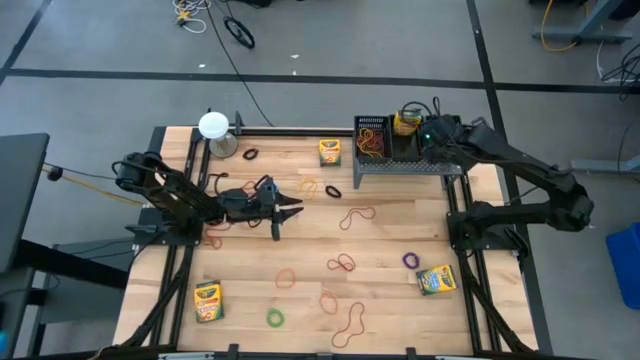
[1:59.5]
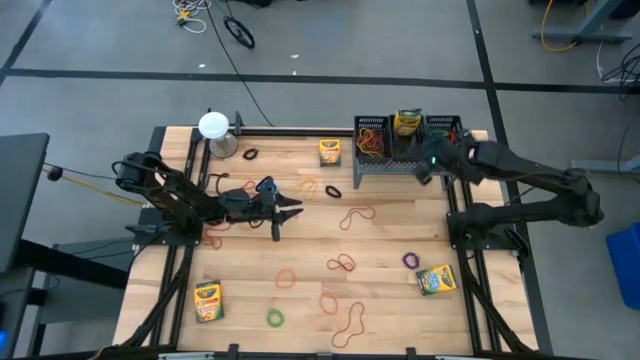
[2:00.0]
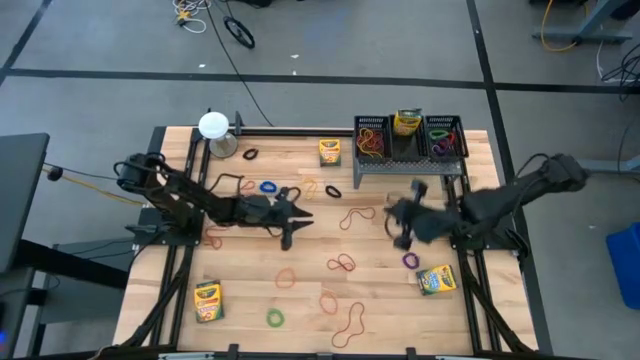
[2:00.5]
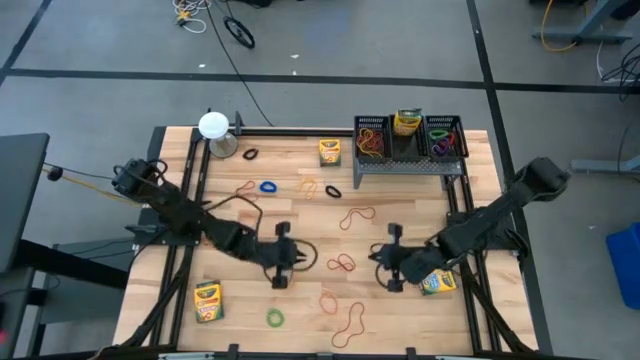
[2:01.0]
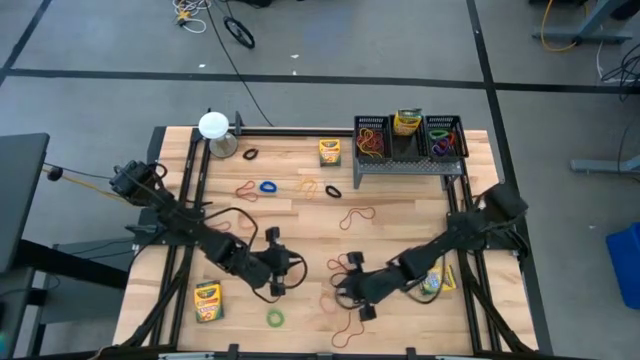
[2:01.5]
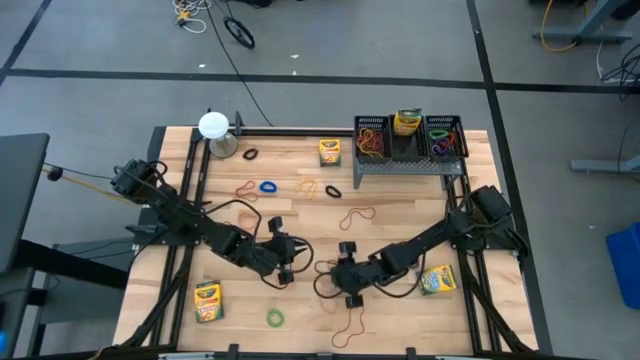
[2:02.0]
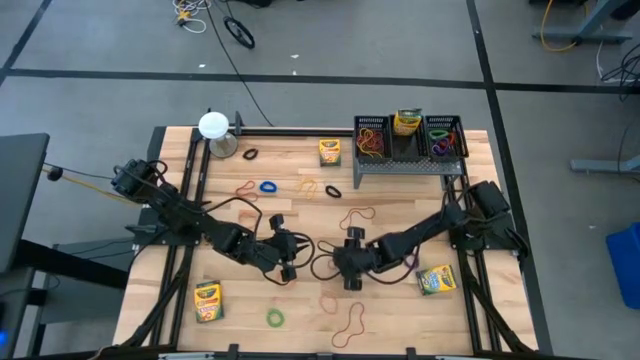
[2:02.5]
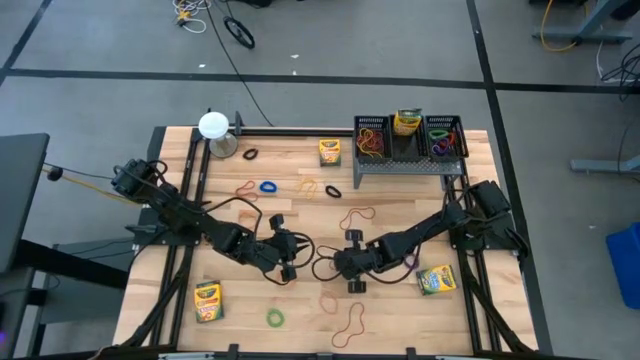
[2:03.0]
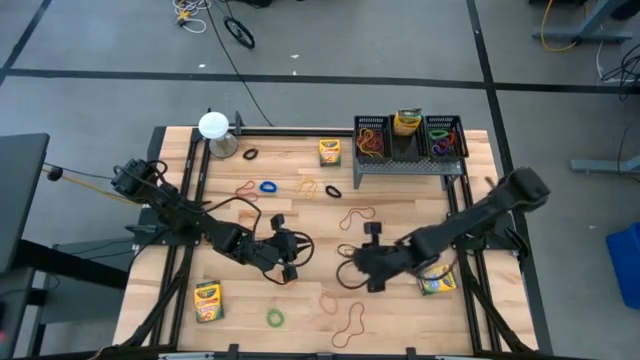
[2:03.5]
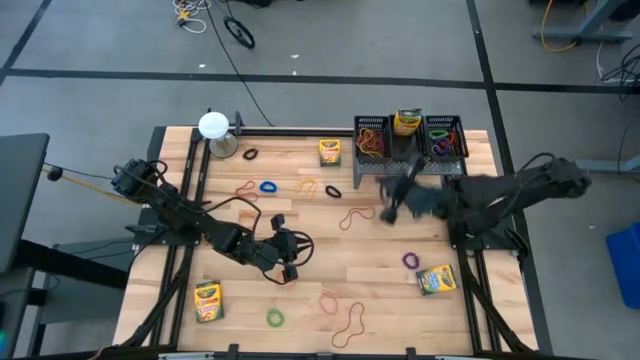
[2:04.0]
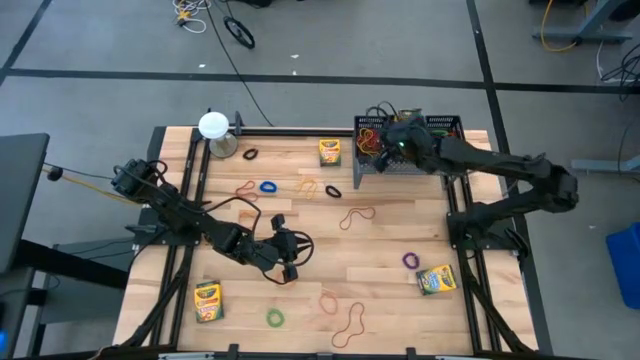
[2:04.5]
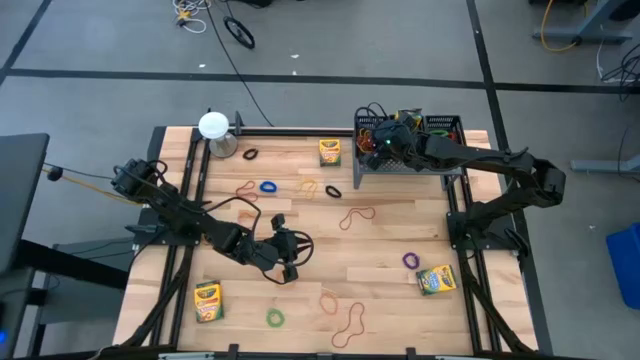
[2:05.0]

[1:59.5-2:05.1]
Task: Pick & Place Office Desk Supplies
Put the red rubber band into the left black bin on the shelf

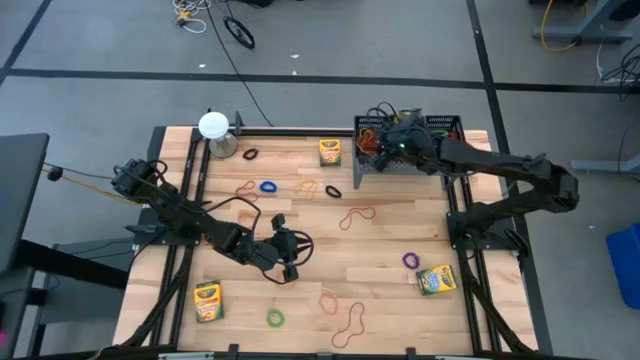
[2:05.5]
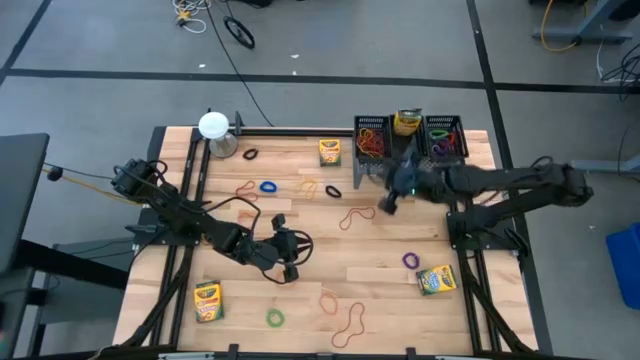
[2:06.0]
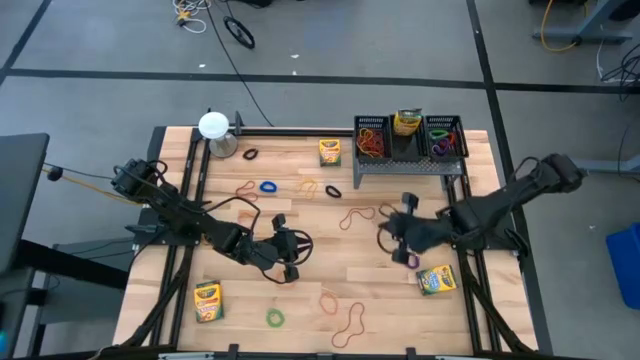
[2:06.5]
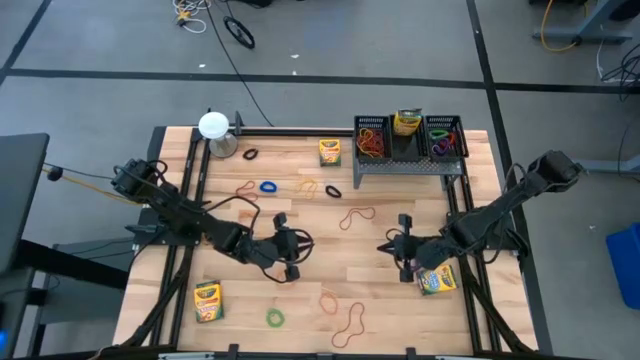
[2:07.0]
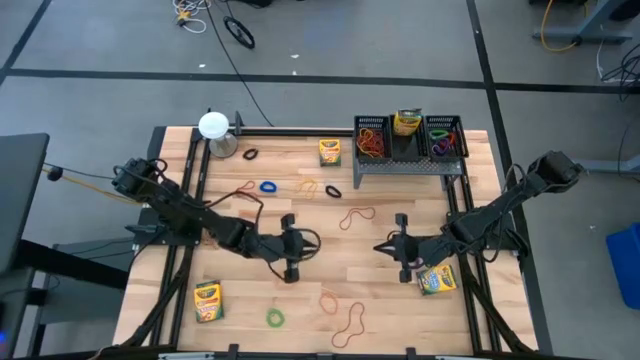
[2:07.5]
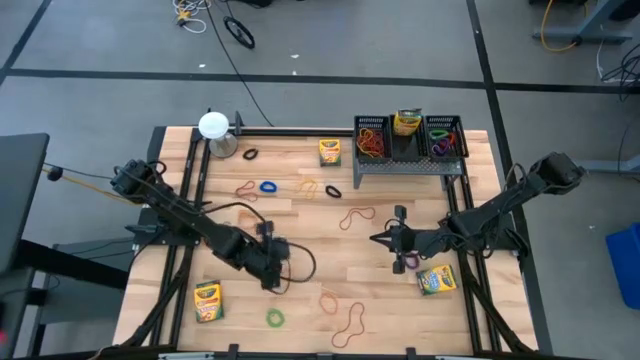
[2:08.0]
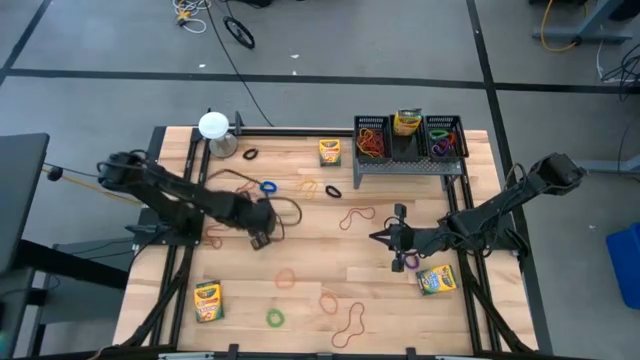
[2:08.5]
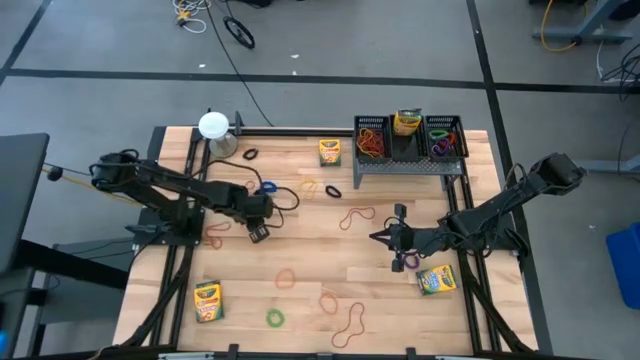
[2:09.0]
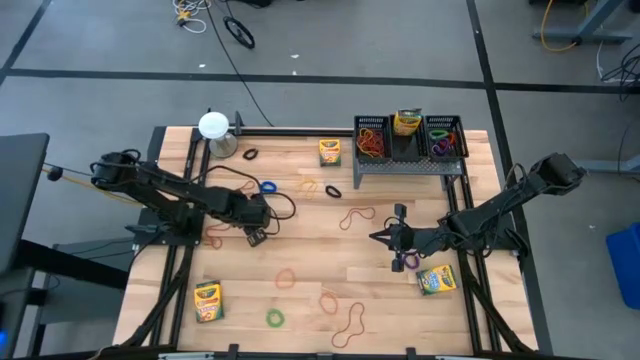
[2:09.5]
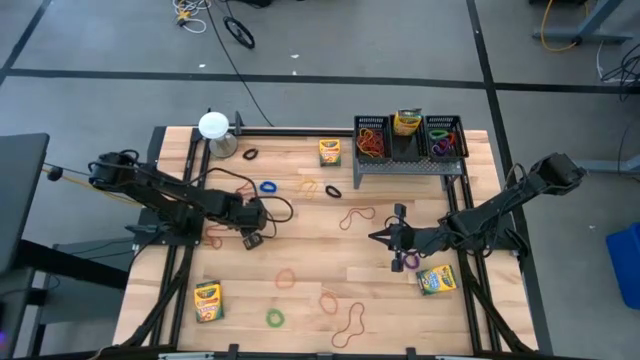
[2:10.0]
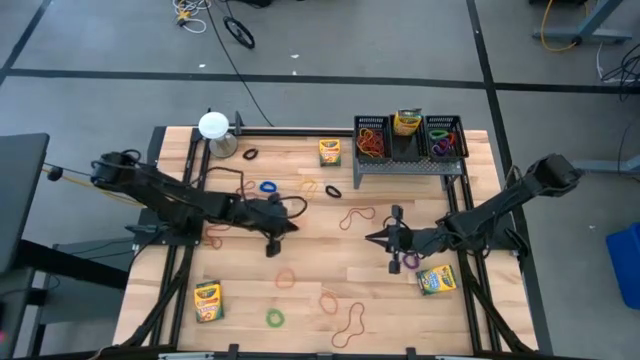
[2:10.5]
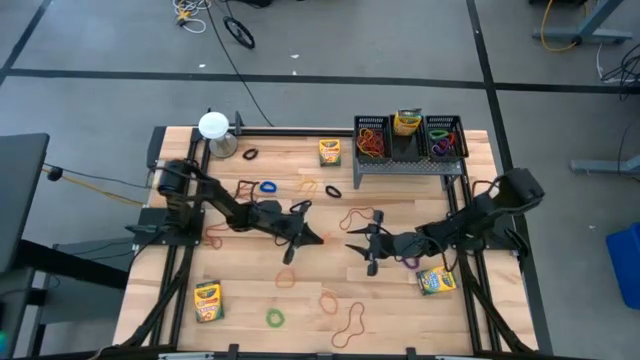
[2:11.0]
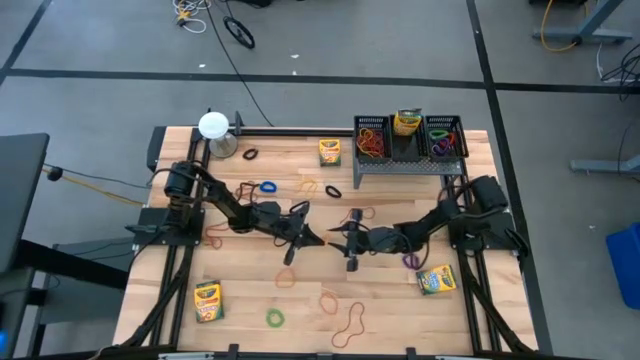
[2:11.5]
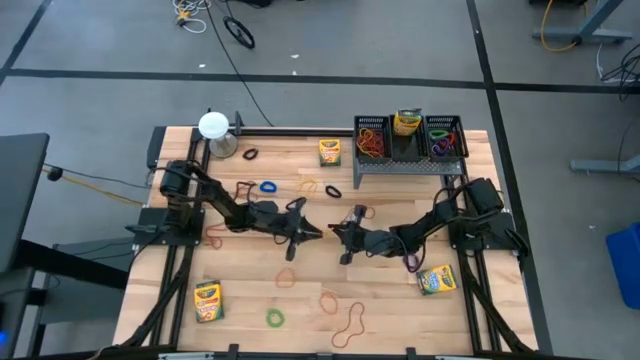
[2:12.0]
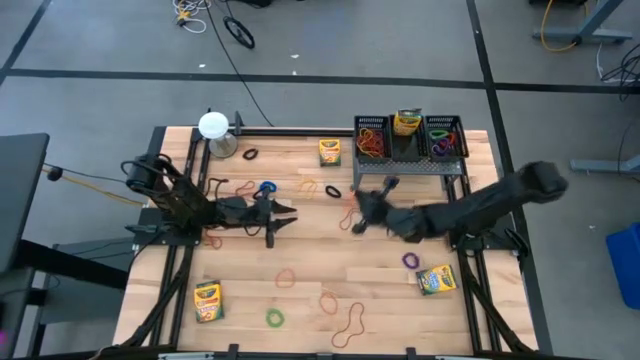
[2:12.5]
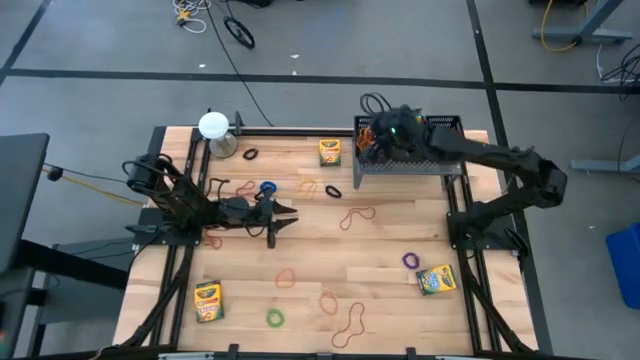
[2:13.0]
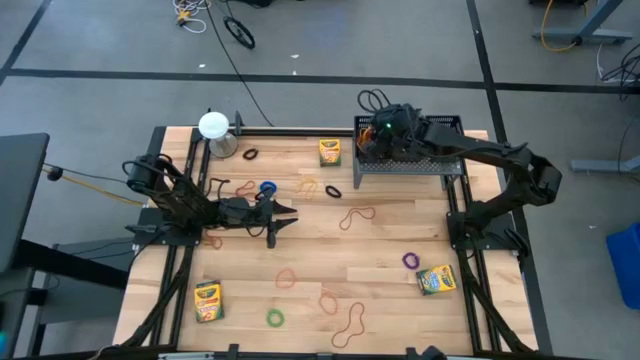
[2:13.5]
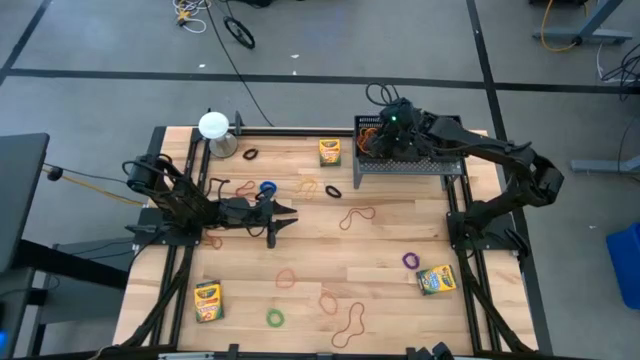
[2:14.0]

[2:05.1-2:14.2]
Put the orange rubber band into the left black bin on the shelf

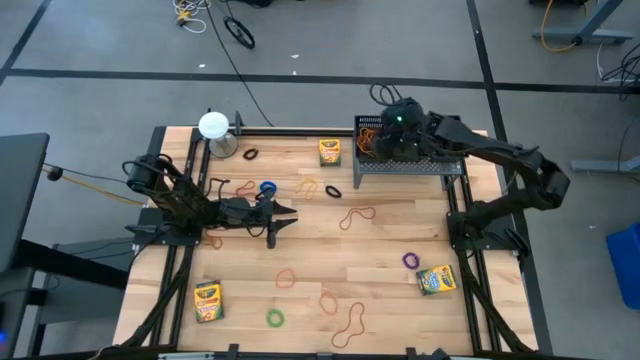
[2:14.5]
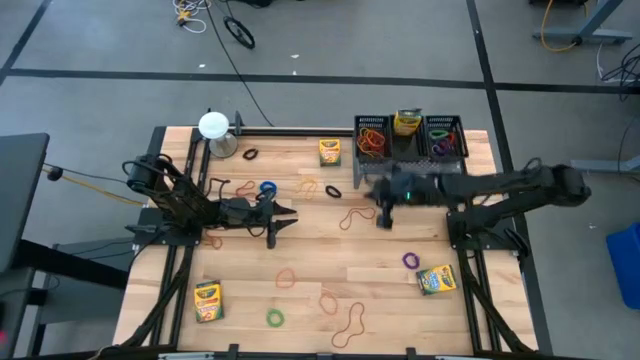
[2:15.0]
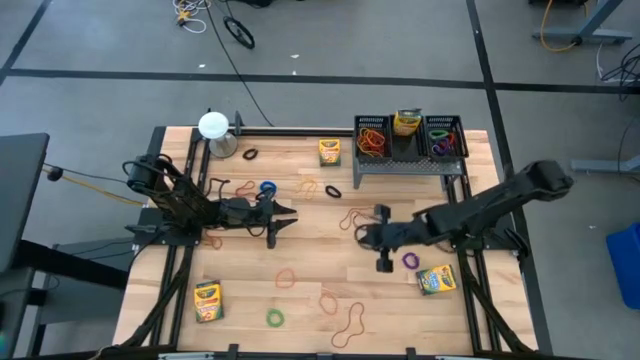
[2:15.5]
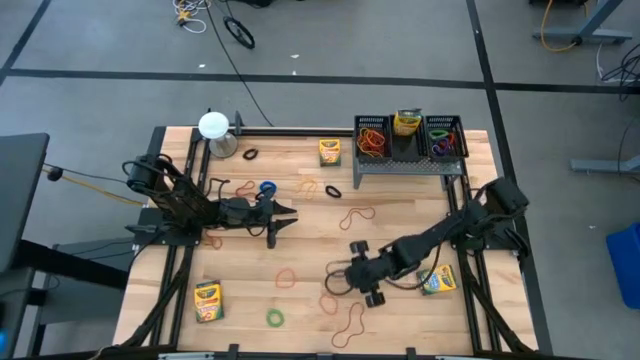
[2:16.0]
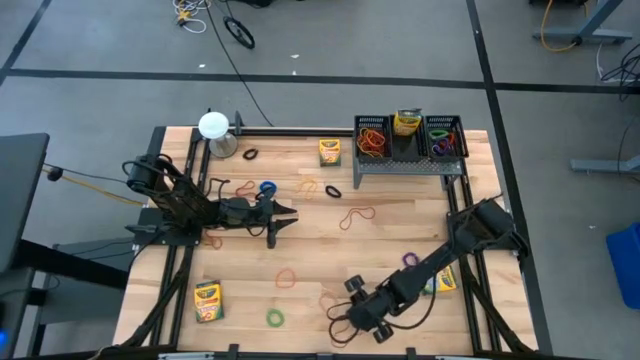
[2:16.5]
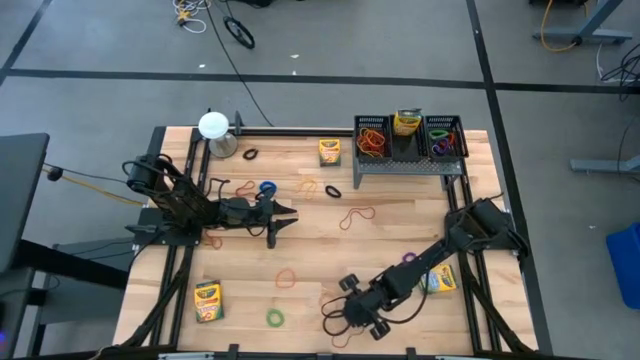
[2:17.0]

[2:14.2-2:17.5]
Put the red rubber band into the left black bin on the shelf

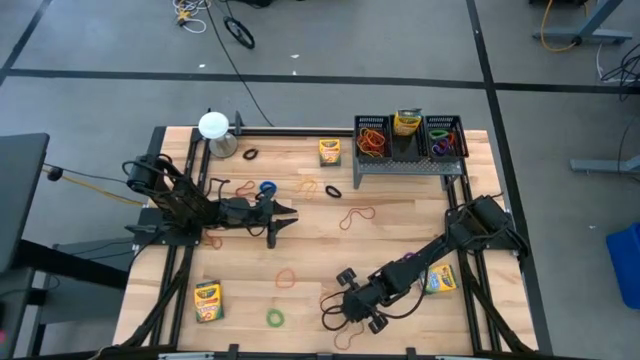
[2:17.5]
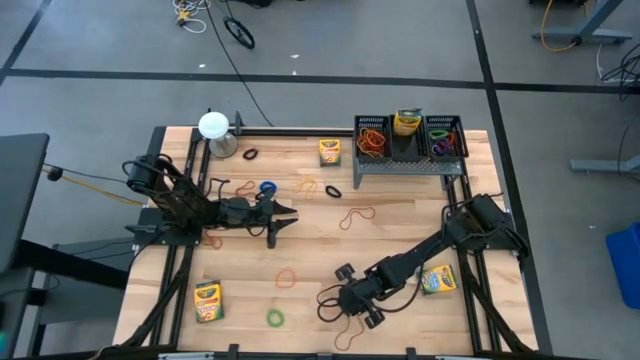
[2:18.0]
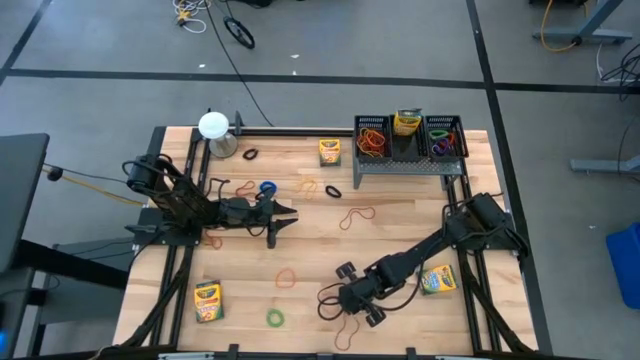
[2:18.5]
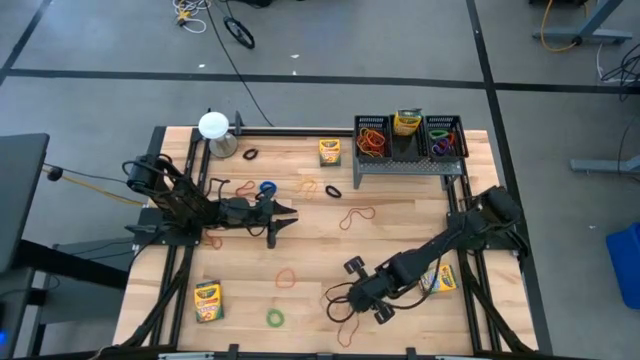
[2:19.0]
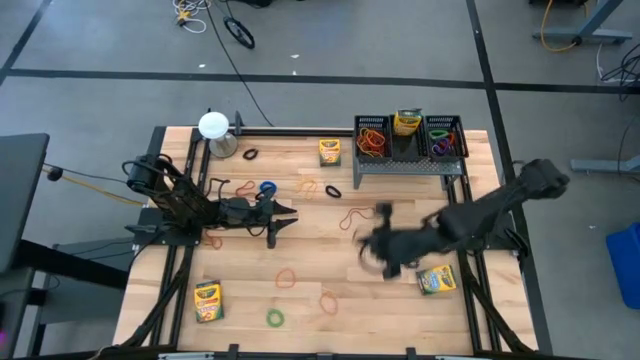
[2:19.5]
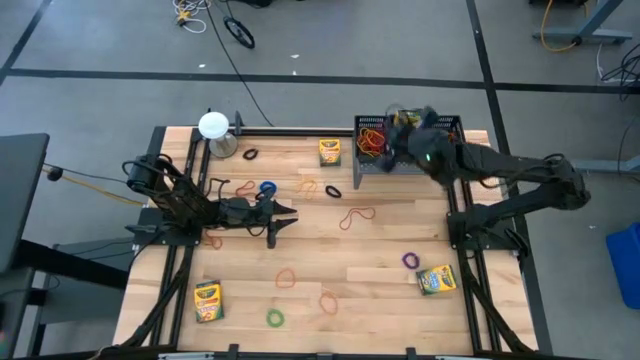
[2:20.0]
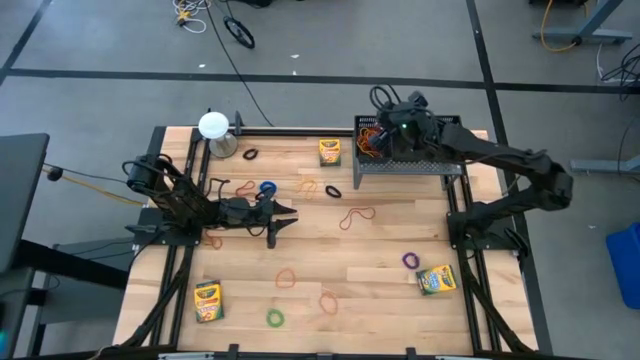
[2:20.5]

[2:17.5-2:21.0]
Put the red rubber band into the left black bin on the shelf
